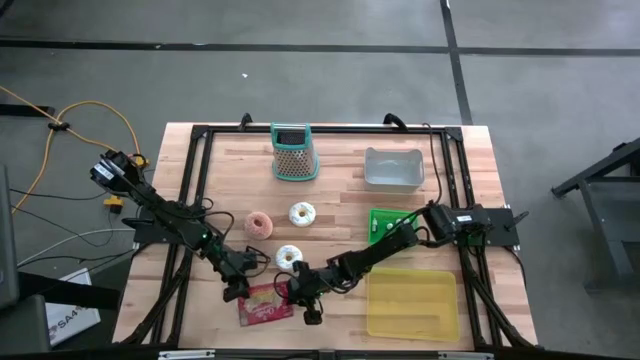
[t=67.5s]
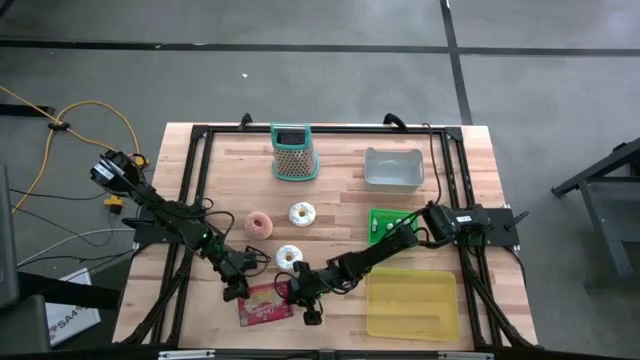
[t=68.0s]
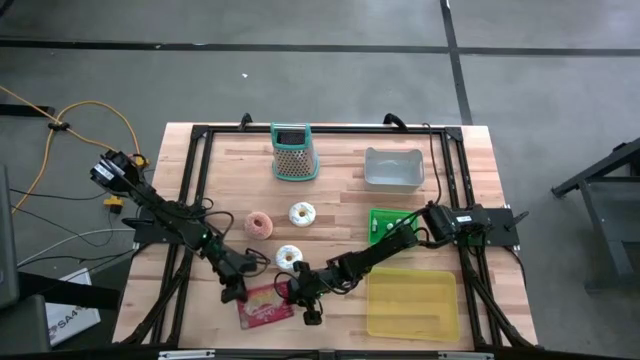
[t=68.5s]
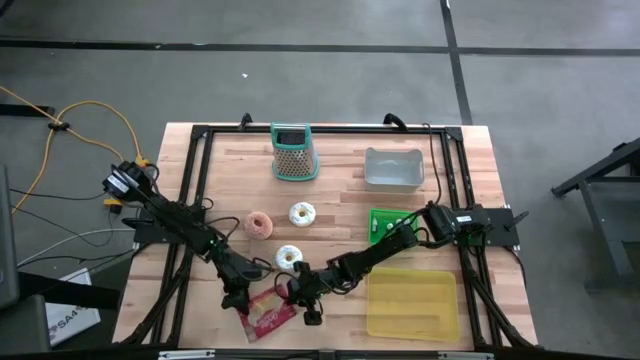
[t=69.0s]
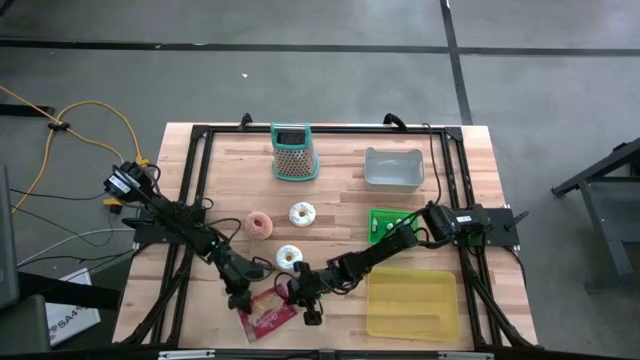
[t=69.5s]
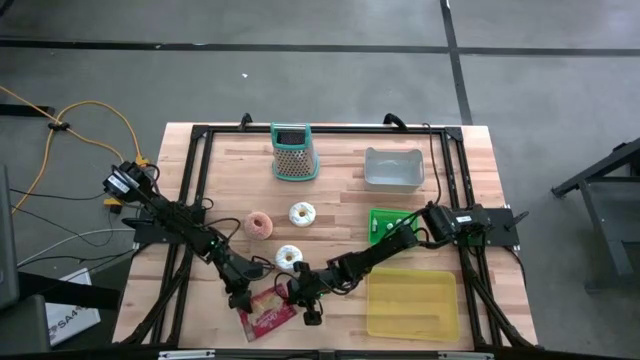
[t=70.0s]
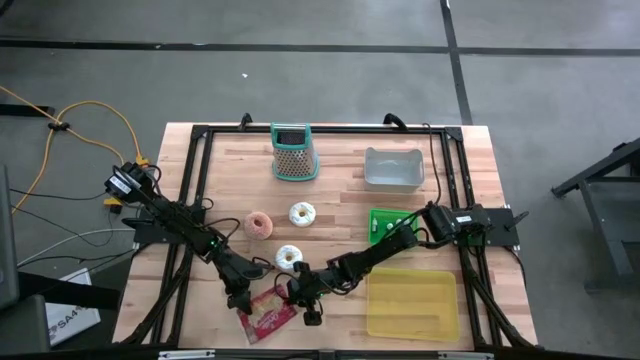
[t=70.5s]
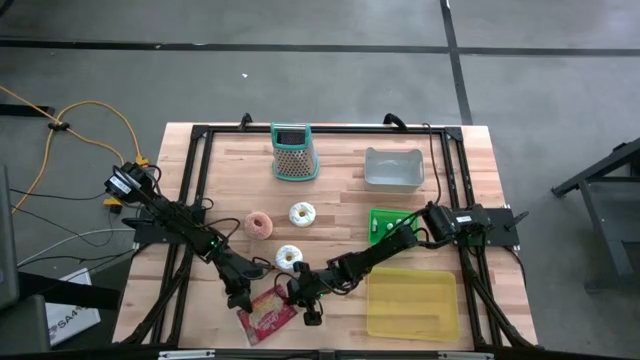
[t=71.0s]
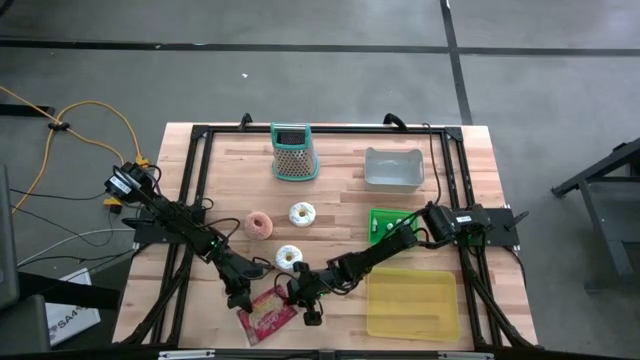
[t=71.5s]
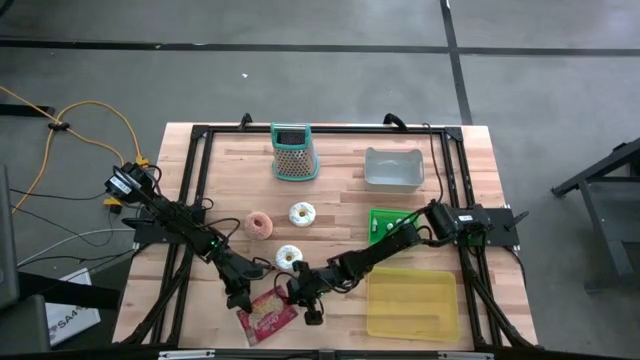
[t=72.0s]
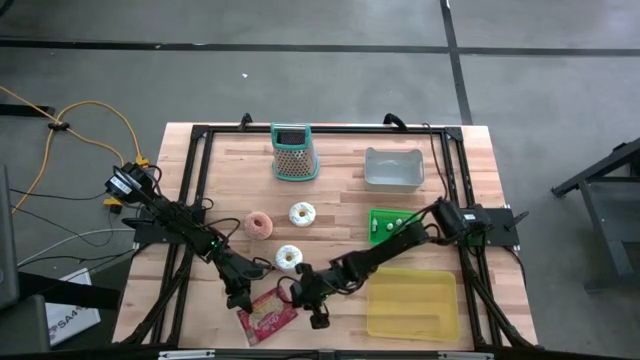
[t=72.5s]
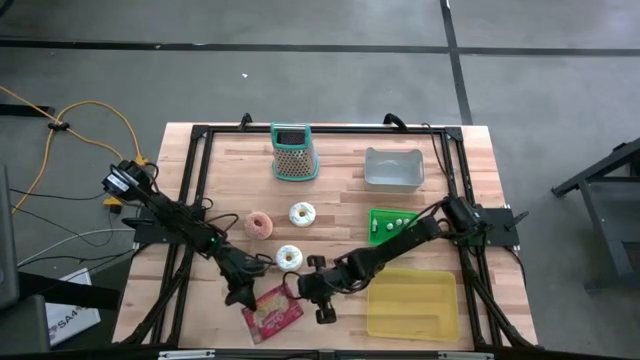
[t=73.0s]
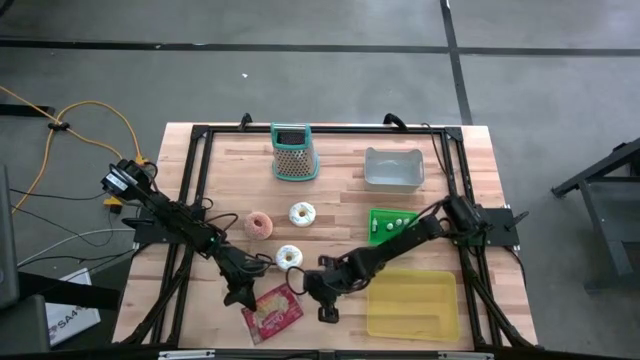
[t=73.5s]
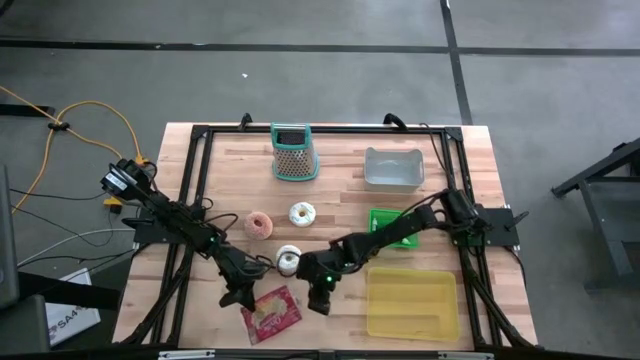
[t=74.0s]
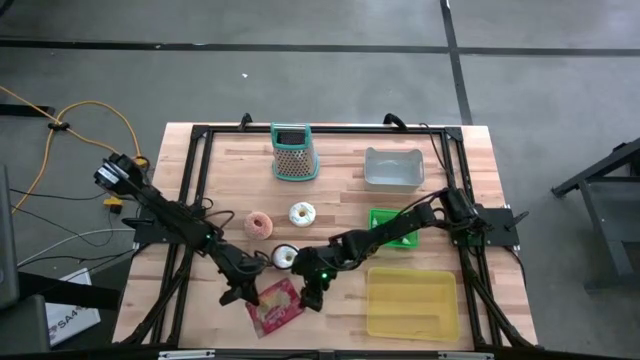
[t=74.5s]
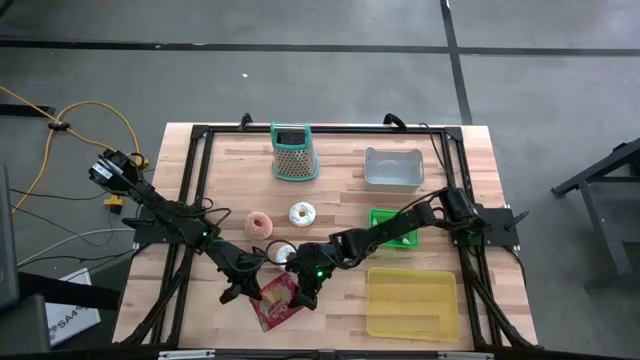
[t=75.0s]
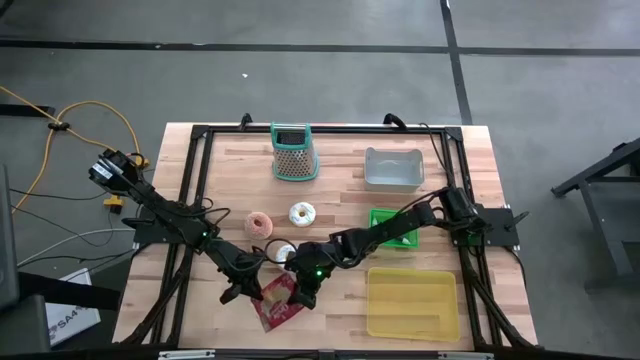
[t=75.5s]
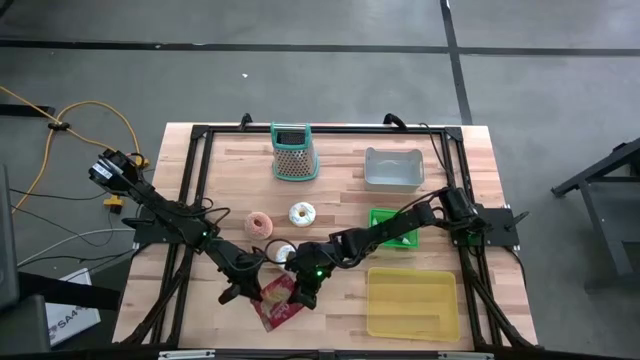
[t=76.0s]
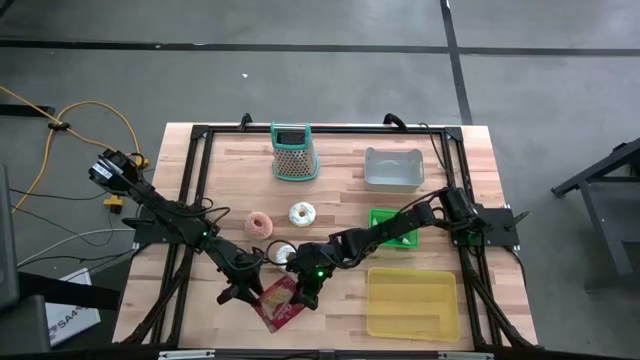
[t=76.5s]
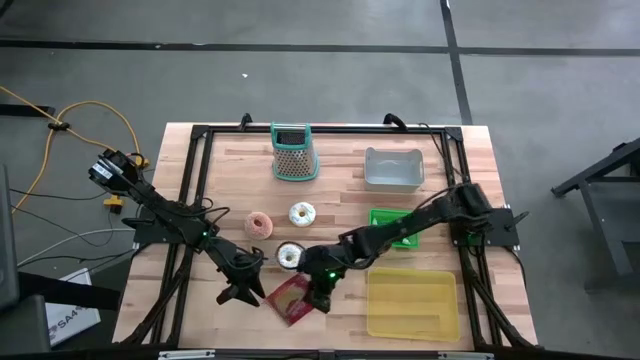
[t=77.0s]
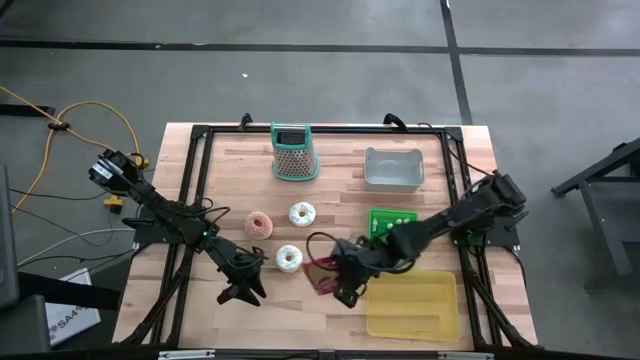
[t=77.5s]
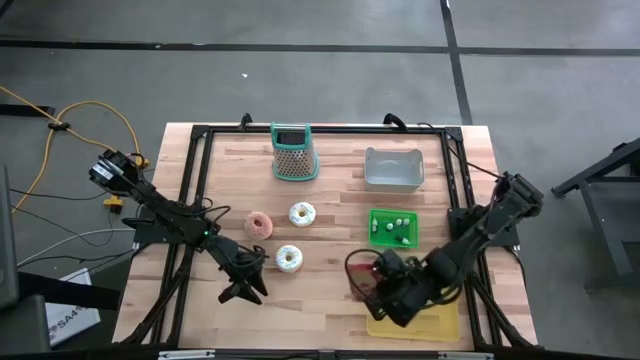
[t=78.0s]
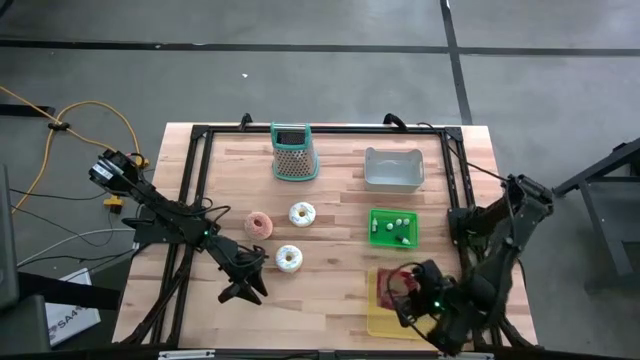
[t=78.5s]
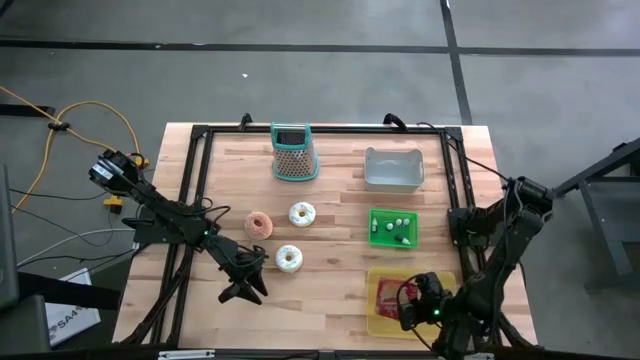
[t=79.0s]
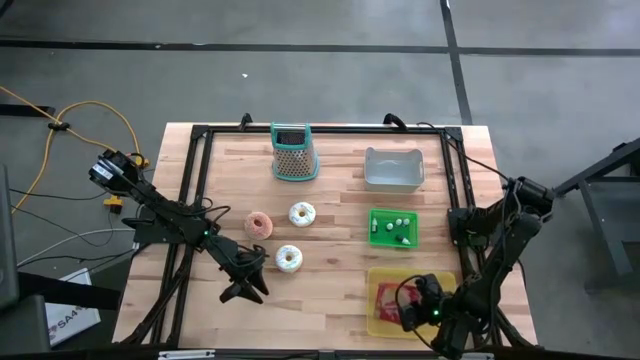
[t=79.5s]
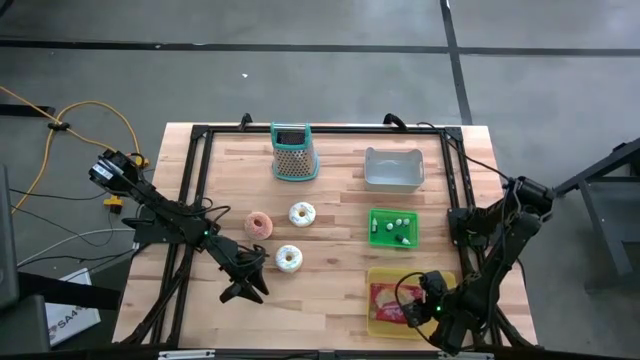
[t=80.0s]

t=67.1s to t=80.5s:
Put the red popcorn bag into the yellow bin
